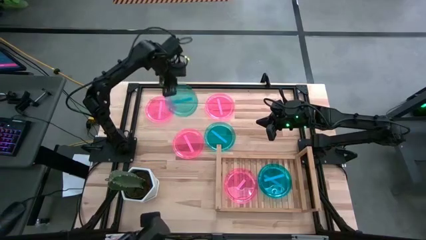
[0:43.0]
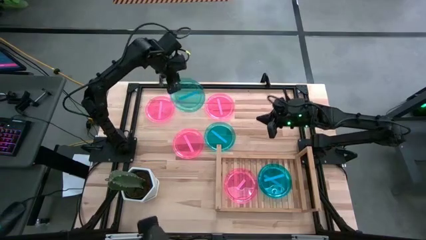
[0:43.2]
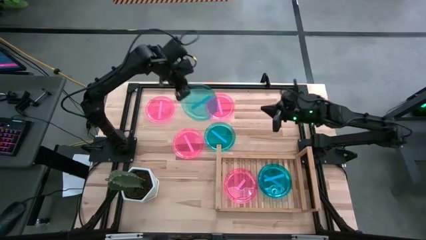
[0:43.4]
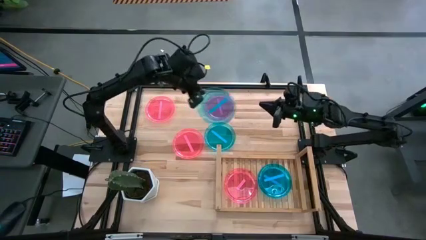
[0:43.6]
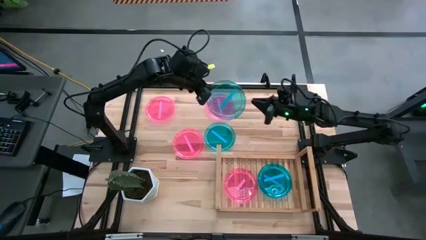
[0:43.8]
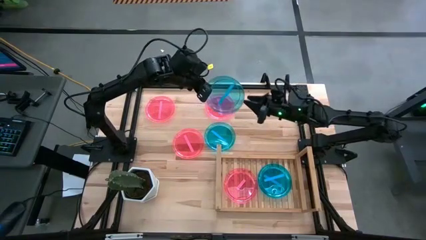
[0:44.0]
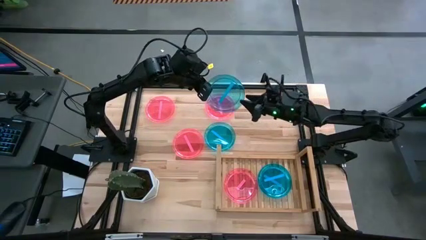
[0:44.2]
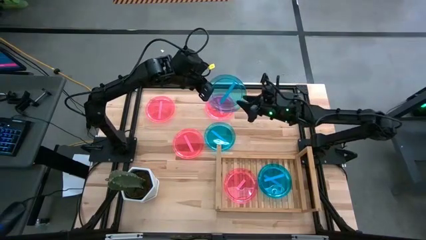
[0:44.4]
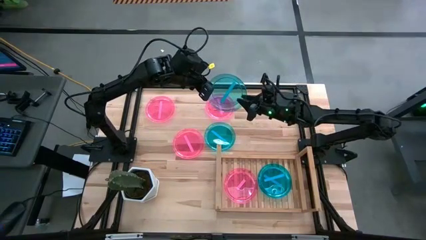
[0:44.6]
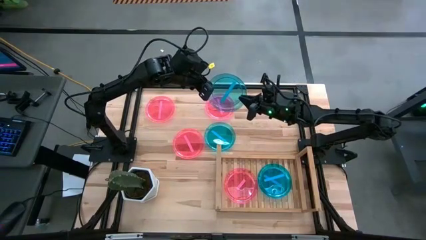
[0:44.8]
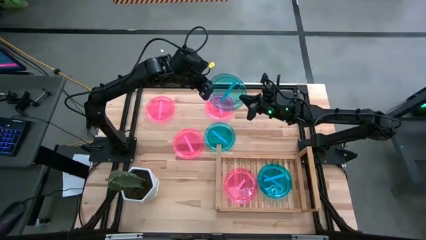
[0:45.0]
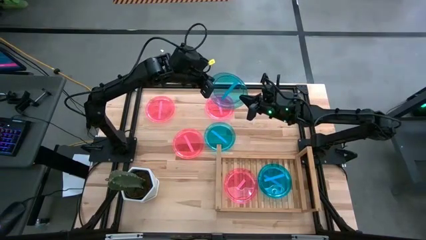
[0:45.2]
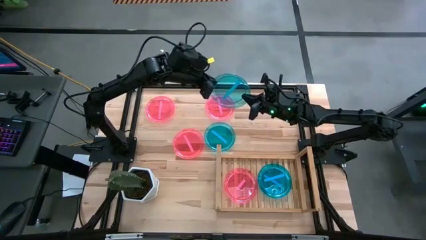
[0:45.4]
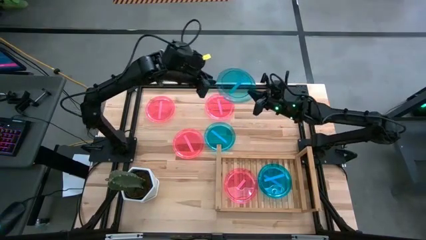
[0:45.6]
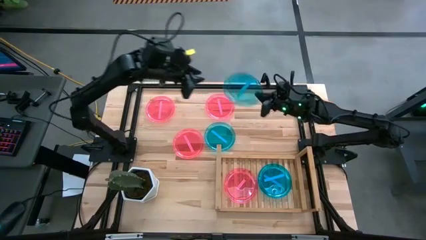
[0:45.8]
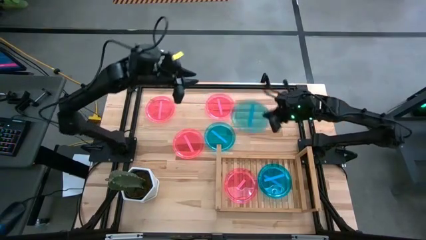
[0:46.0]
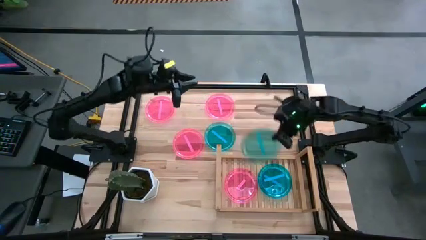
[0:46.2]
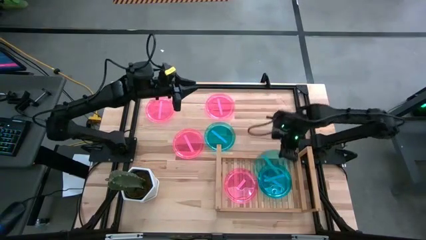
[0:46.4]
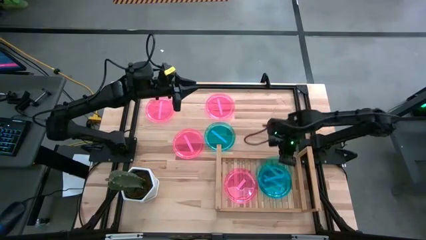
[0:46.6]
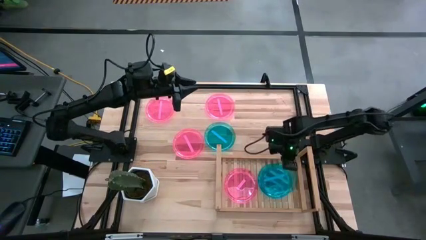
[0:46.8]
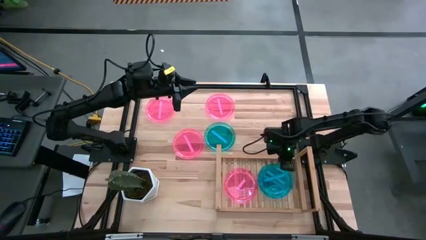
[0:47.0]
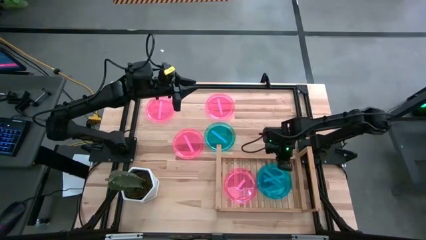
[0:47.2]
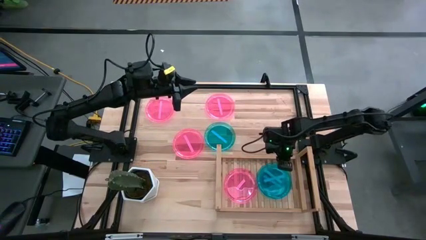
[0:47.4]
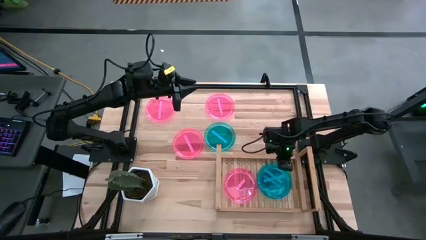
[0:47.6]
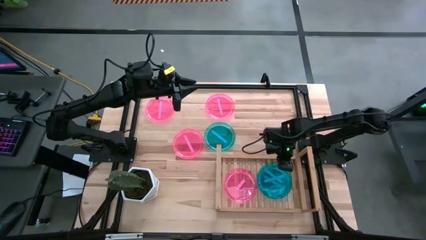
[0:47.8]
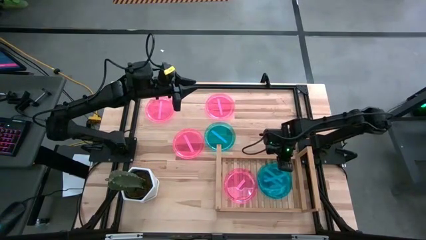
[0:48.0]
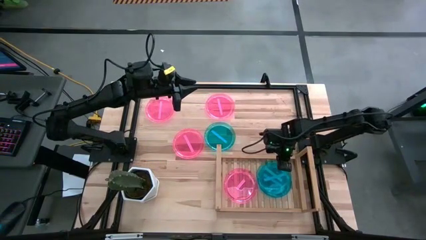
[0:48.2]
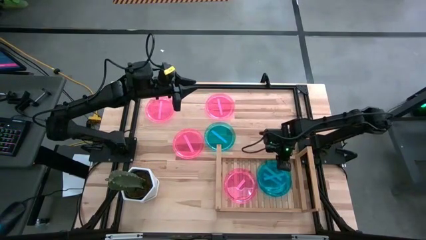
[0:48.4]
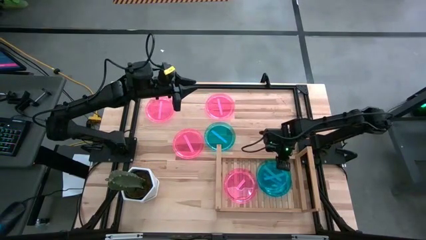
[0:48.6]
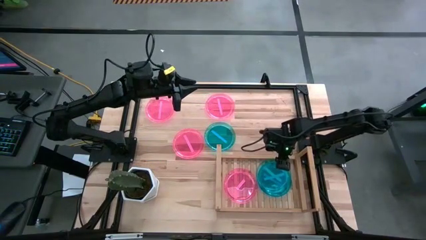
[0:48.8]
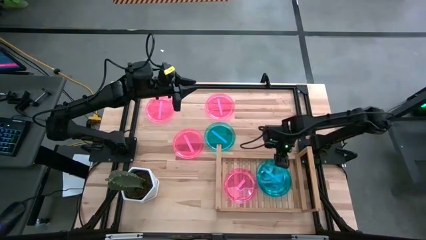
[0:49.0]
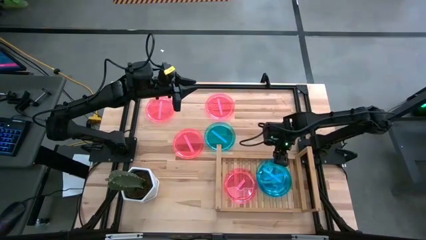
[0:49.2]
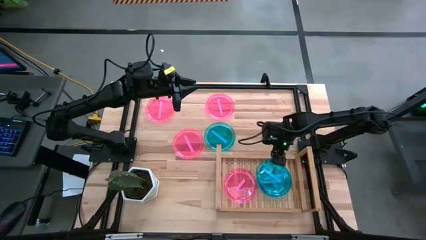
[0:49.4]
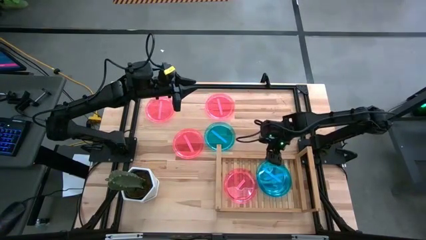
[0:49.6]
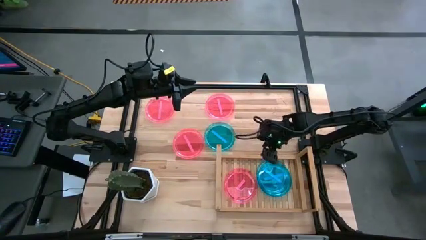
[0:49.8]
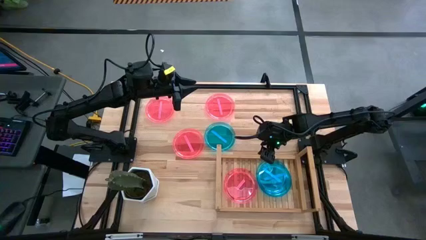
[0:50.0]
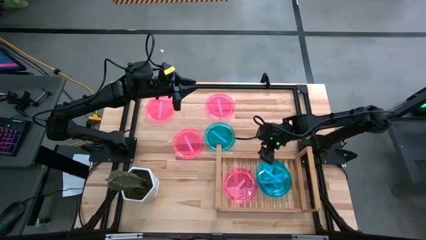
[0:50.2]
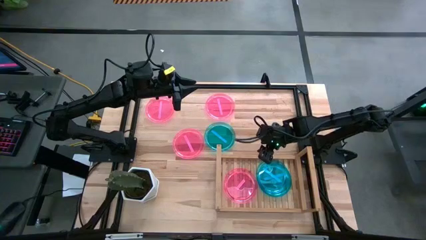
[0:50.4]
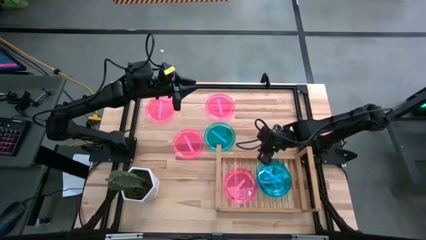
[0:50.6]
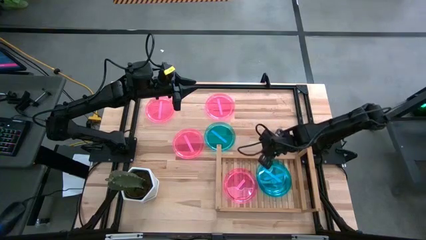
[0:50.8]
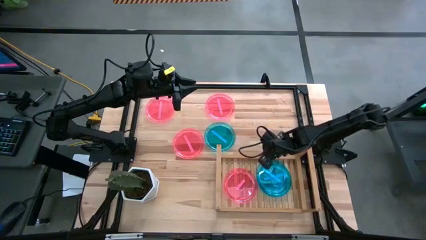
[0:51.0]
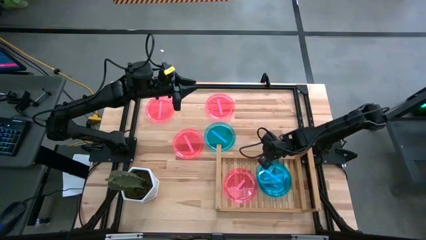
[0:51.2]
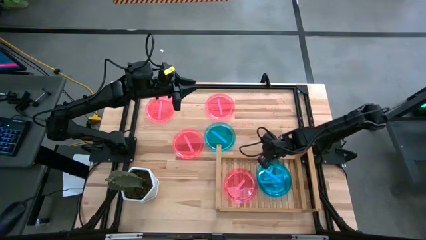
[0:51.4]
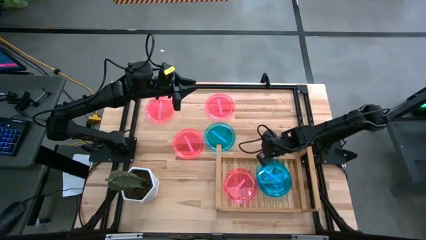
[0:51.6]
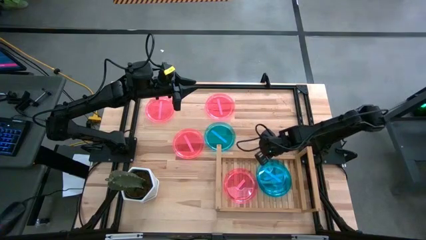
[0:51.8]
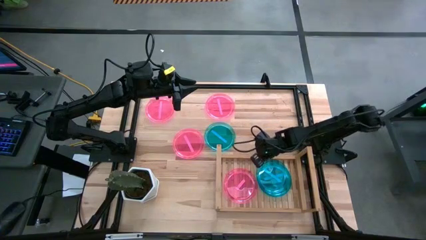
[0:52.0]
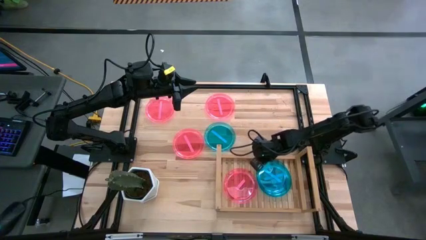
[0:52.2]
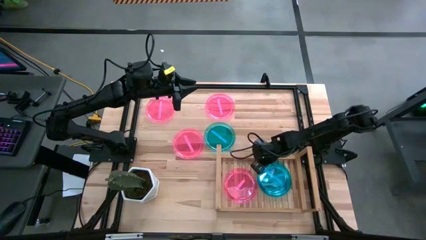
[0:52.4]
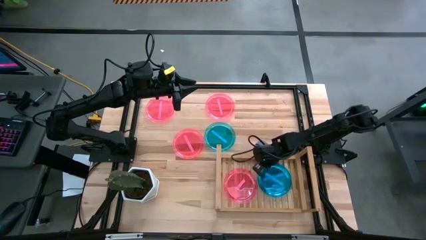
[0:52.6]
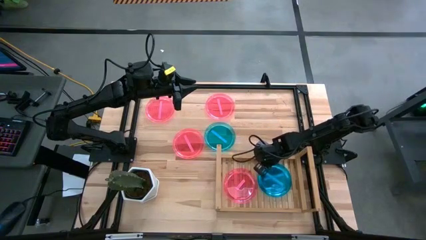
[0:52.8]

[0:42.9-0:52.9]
Task: Place and stack plates onto a shelf
Stack the blue plate on top of the blue plates on the shelf

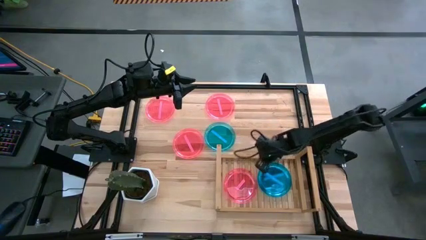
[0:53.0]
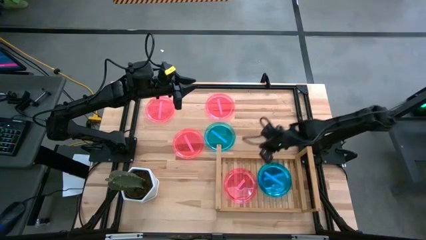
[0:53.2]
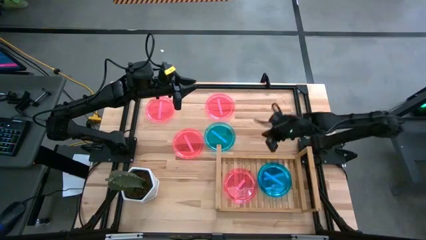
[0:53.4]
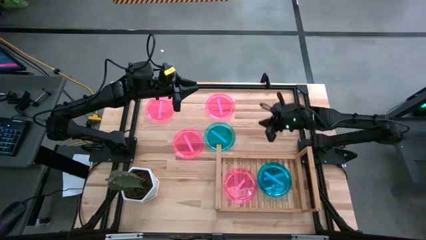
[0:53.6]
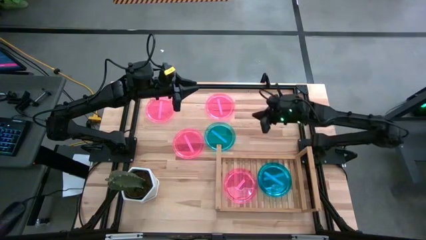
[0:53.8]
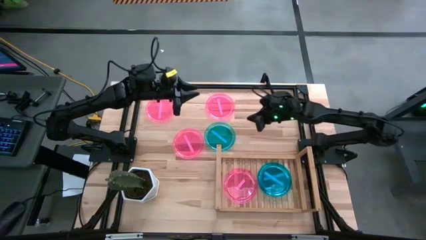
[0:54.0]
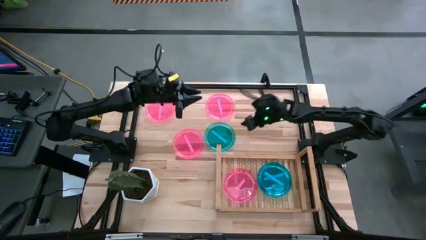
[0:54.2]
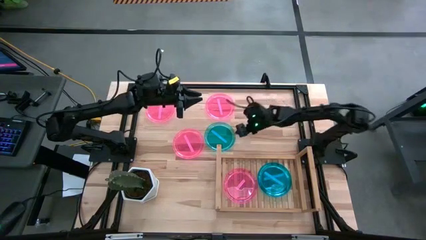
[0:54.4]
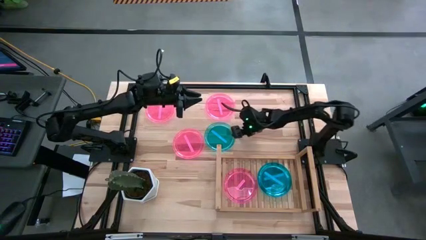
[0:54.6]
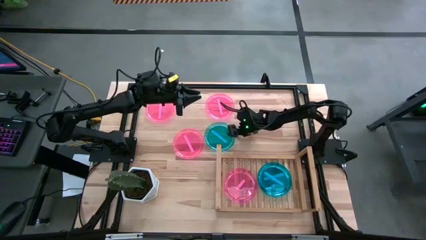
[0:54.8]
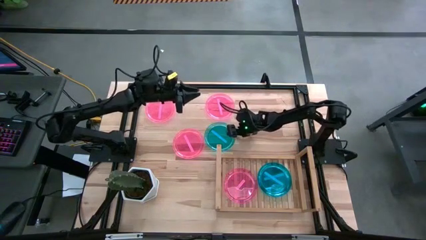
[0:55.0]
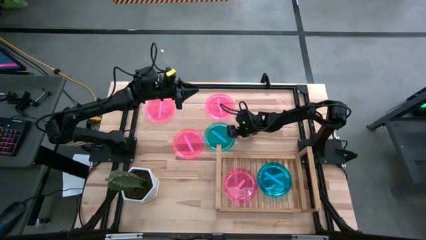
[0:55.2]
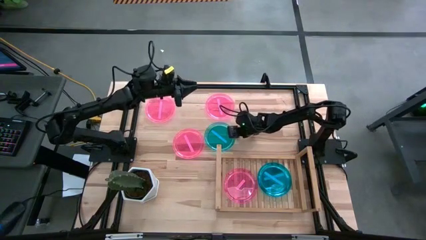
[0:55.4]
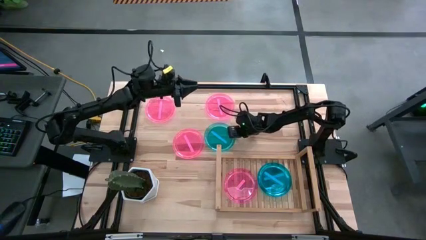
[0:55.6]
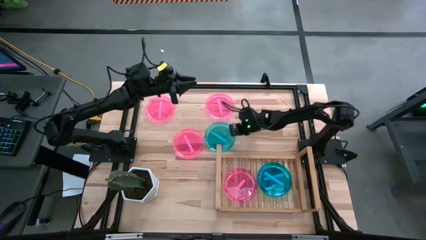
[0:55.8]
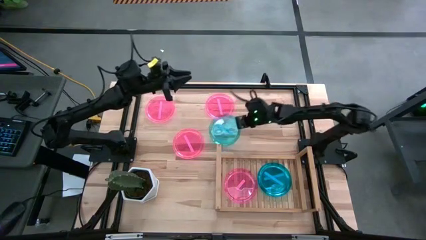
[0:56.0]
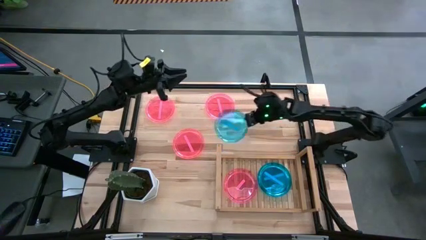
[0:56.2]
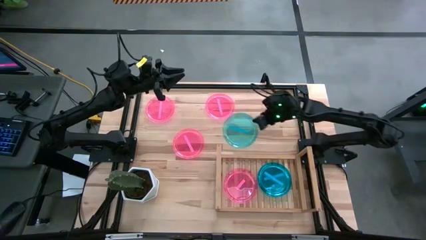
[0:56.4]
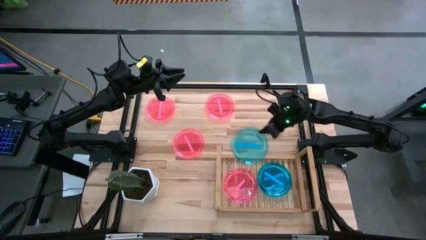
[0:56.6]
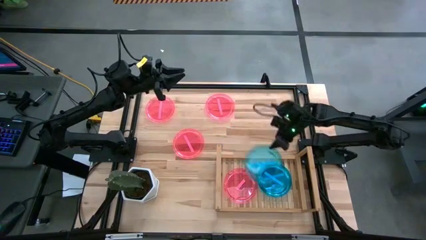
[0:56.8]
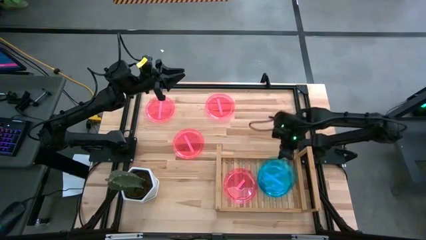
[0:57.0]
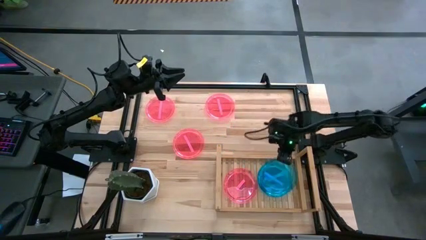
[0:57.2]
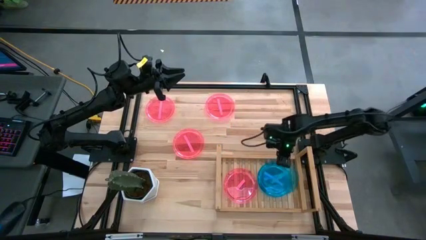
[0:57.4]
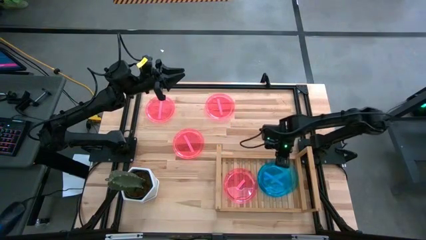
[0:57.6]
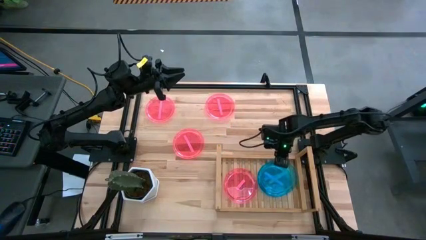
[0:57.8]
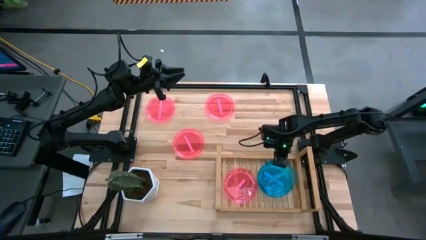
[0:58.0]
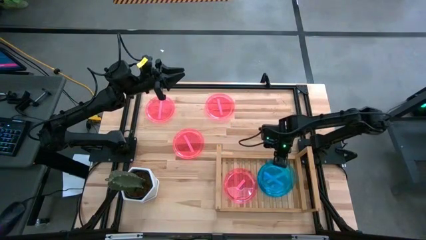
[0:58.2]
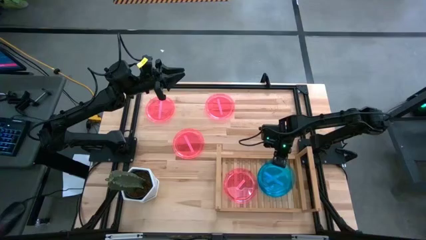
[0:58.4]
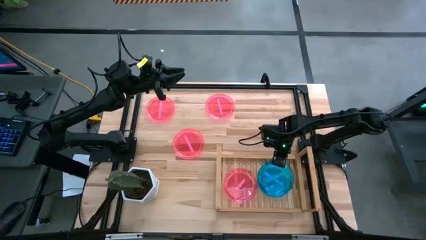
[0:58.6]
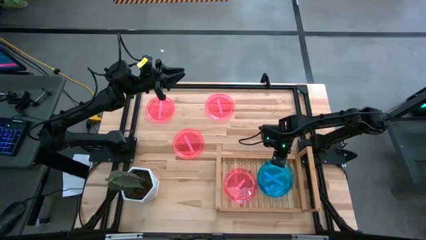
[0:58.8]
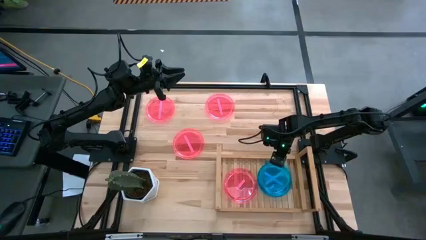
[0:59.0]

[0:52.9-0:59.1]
Stack the blue plate on top of the blue plates on the shelf
